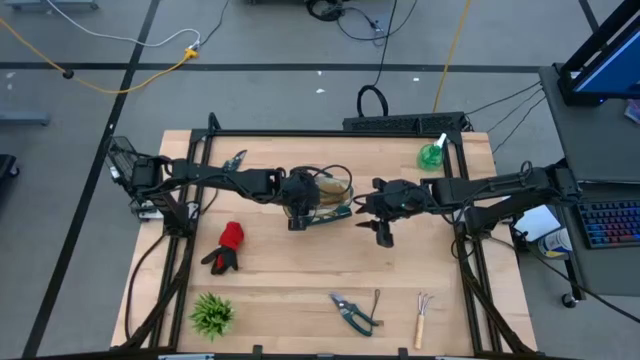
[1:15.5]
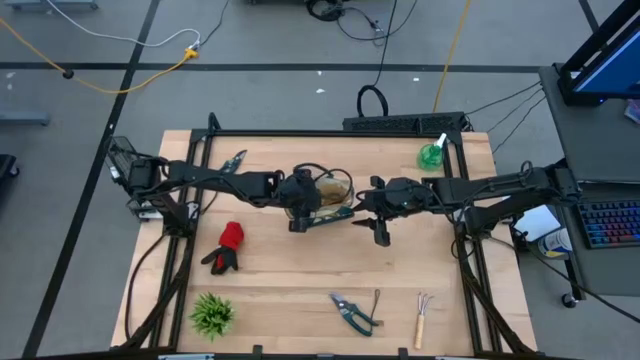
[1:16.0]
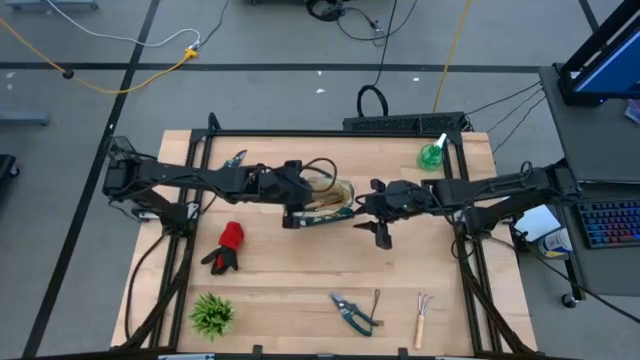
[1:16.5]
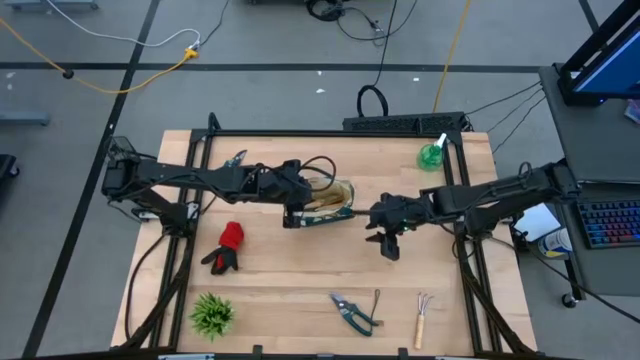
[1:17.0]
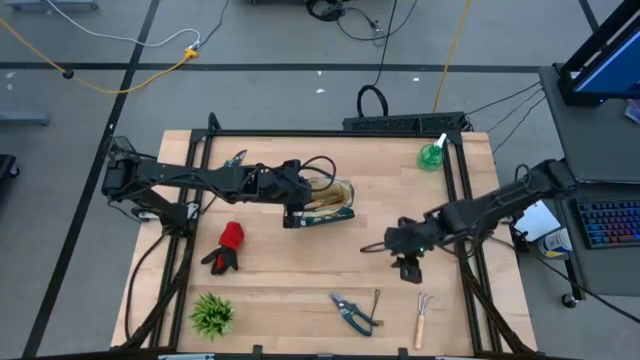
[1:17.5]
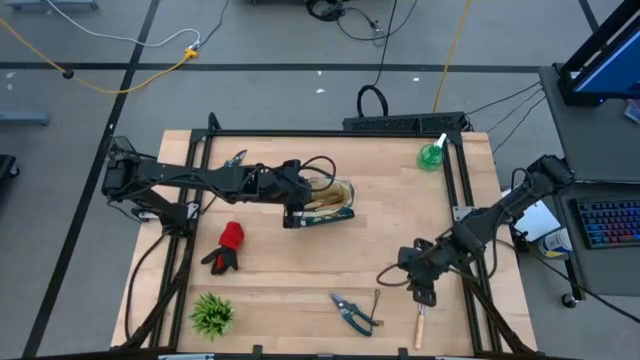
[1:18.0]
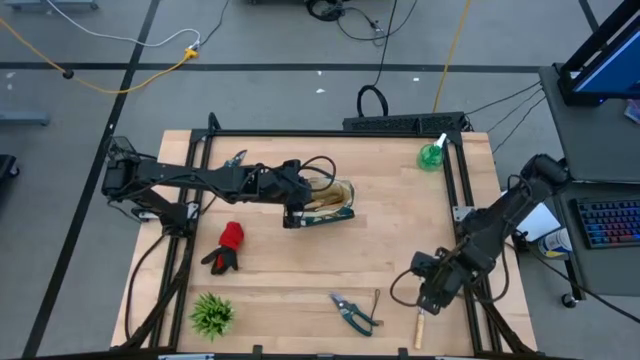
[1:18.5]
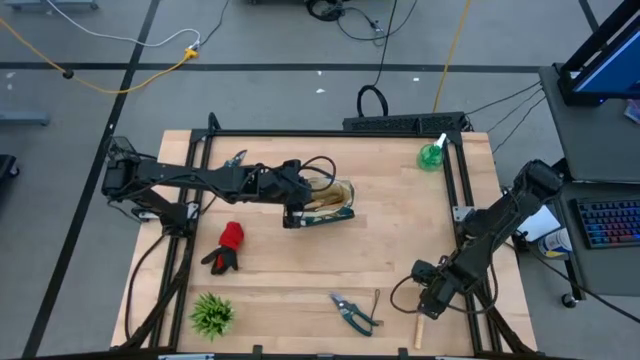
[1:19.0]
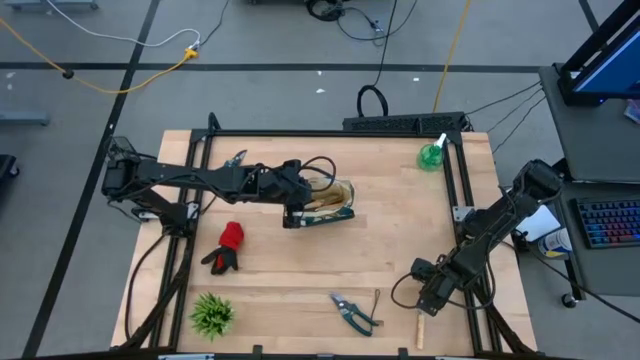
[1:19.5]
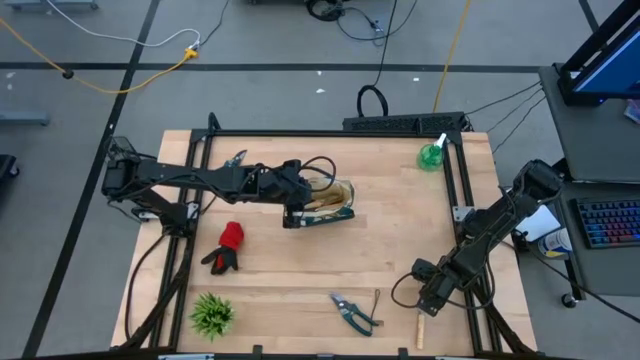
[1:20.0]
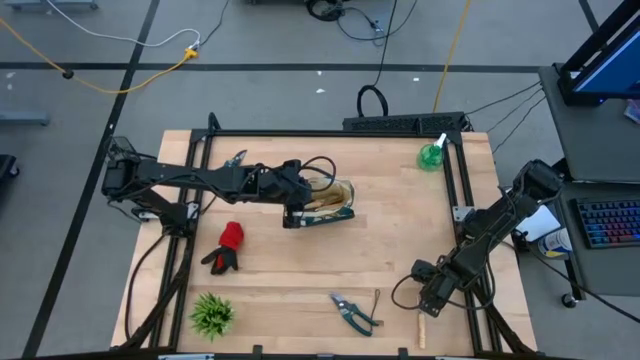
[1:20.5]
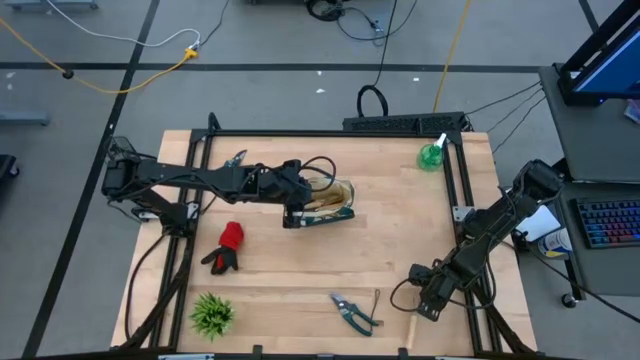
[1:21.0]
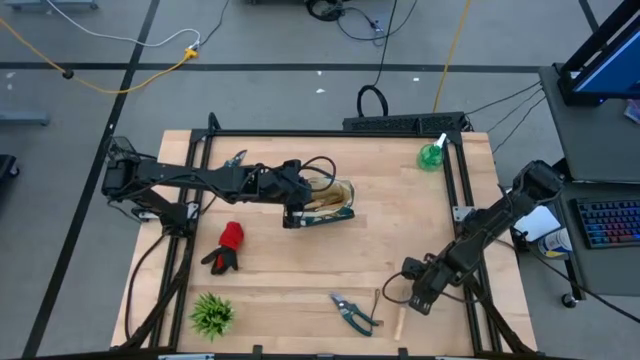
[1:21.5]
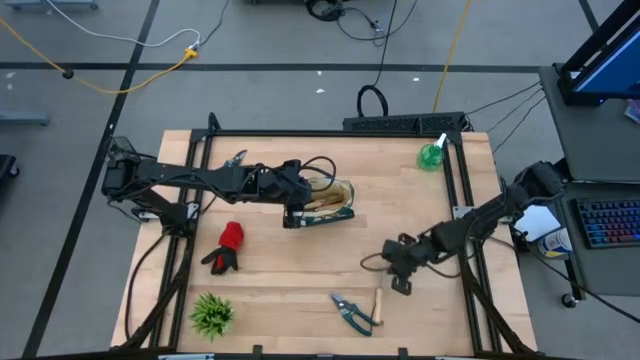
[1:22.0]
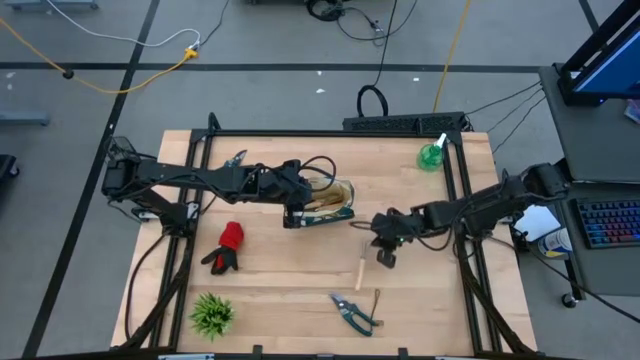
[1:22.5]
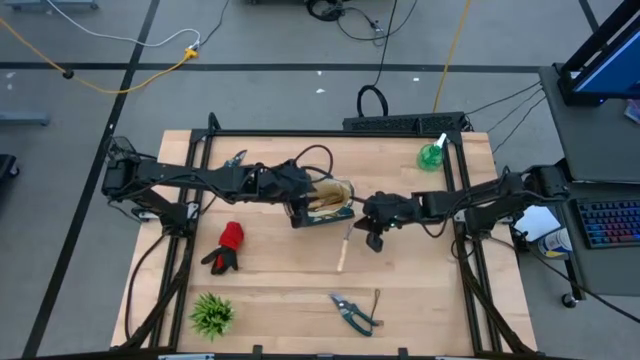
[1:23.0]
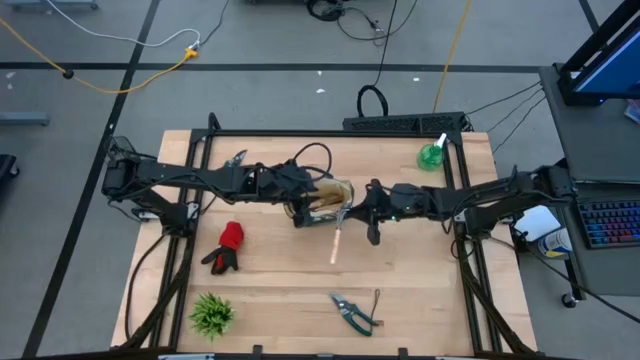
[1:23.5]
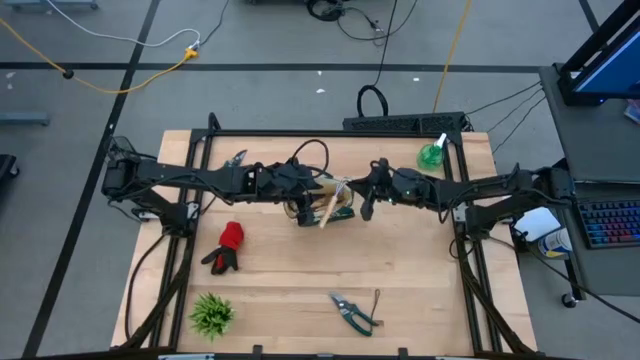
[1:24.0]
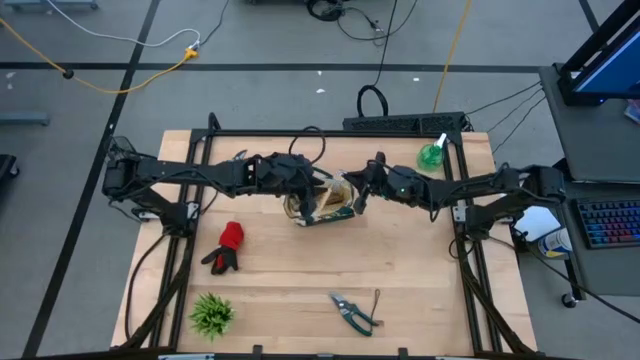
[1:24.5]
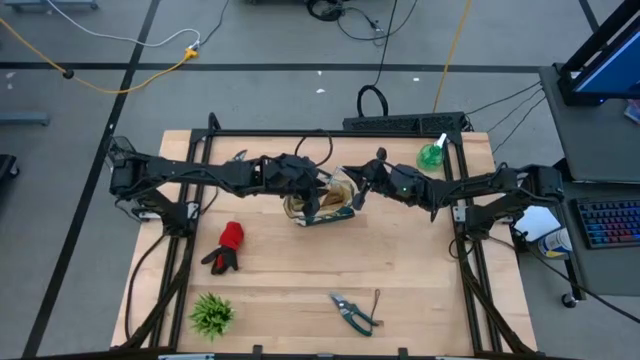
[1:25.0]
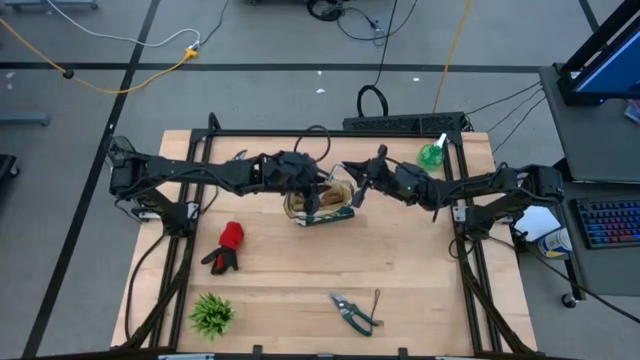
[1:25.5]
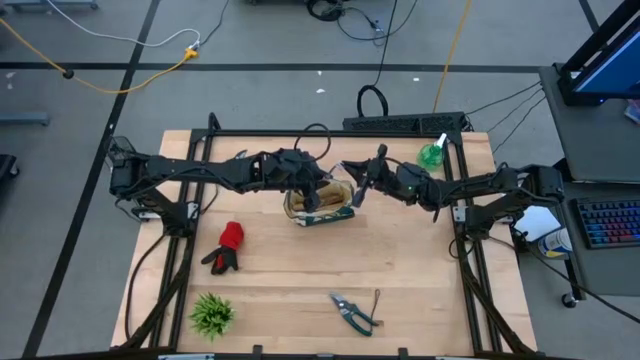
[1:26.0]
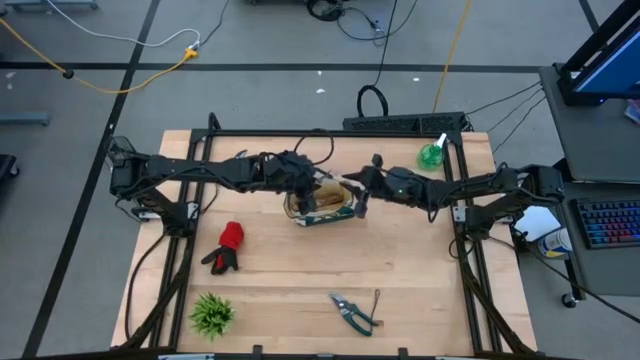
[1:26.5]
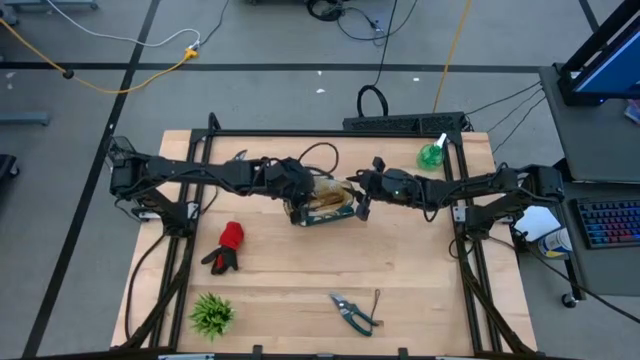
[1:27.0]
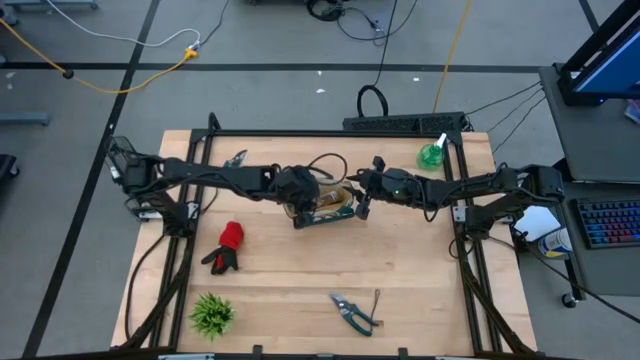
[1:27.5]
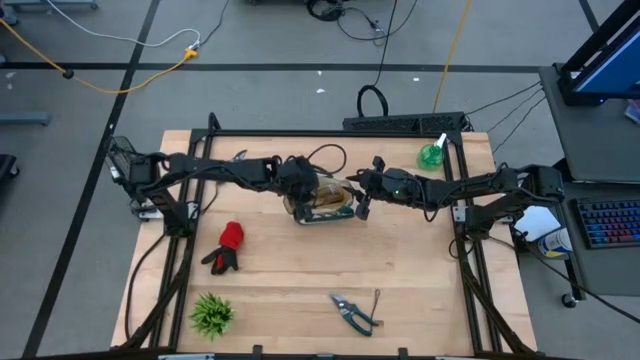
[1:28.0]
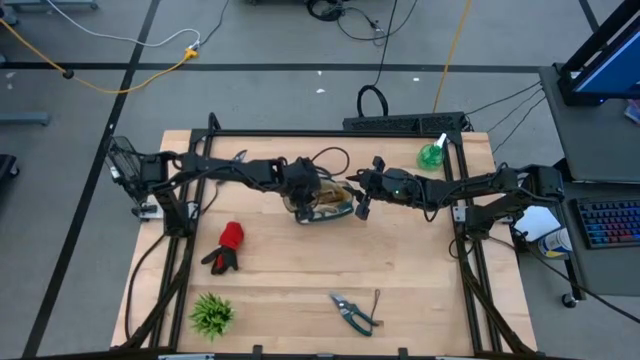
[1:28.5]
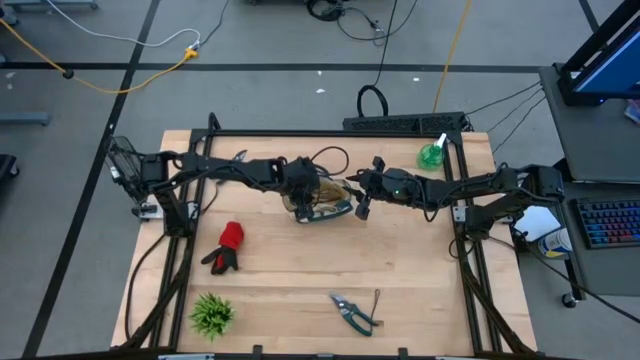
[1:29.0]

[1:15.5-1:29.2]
Task: Pick & Place Garden tools in Gardening bag
Put the brown hand rake into the gardening bag

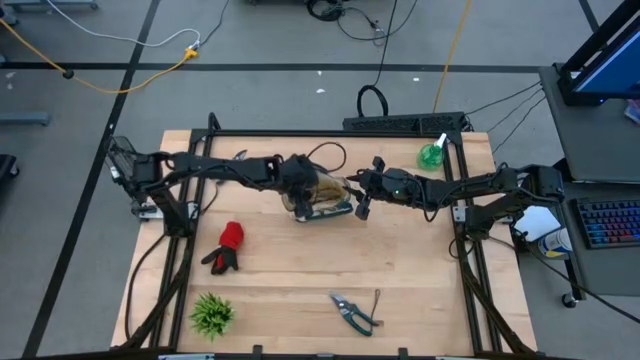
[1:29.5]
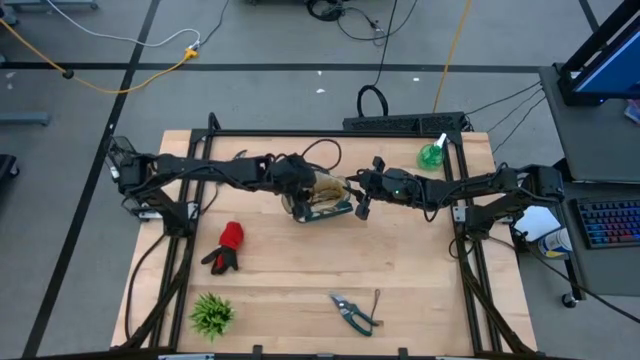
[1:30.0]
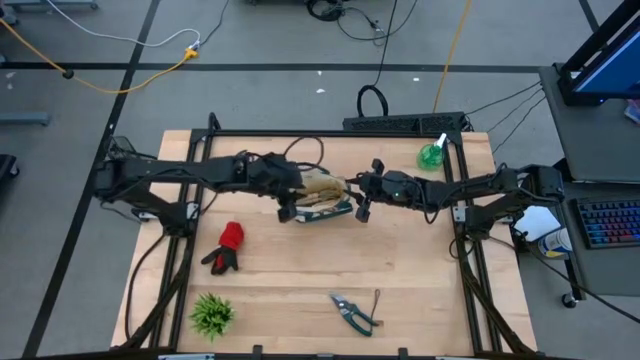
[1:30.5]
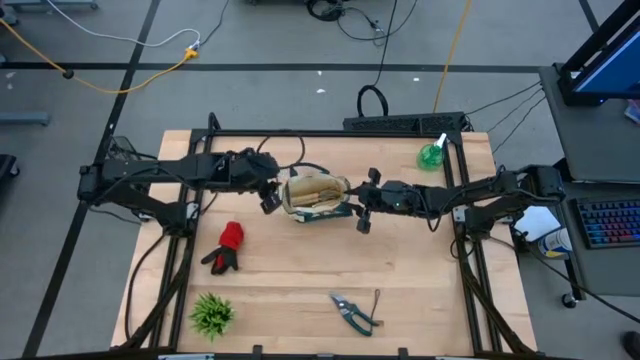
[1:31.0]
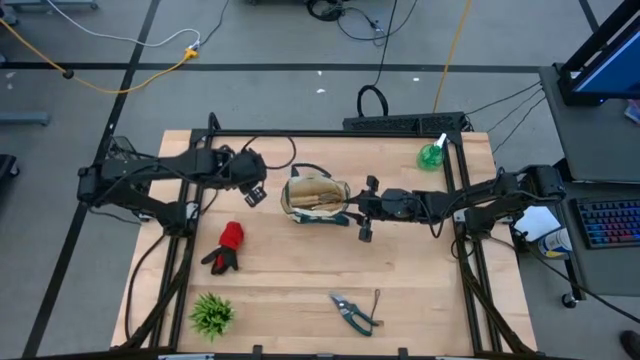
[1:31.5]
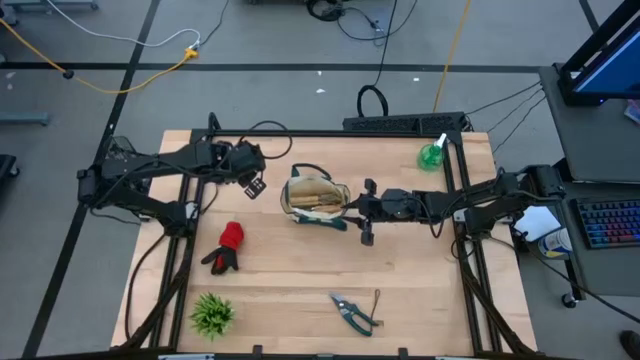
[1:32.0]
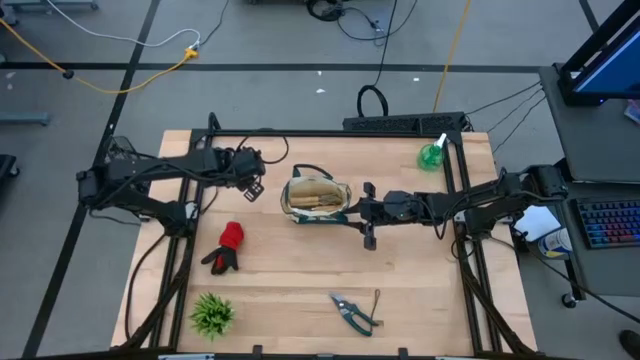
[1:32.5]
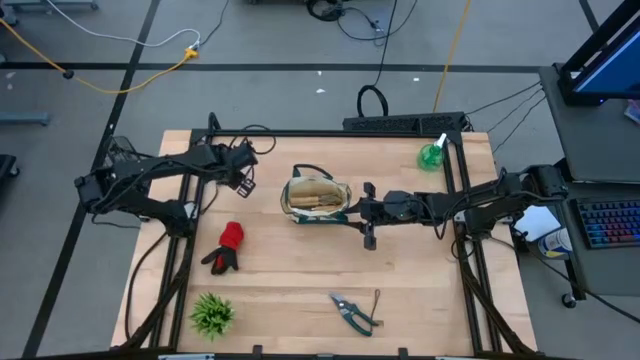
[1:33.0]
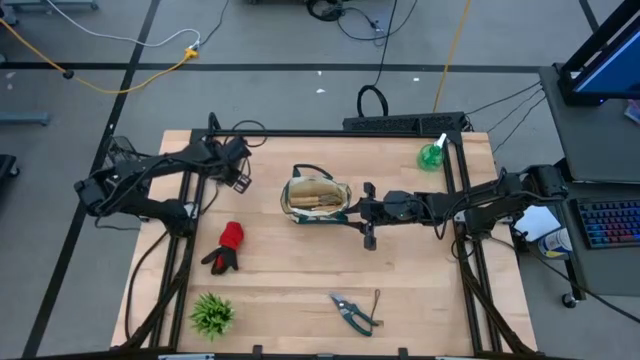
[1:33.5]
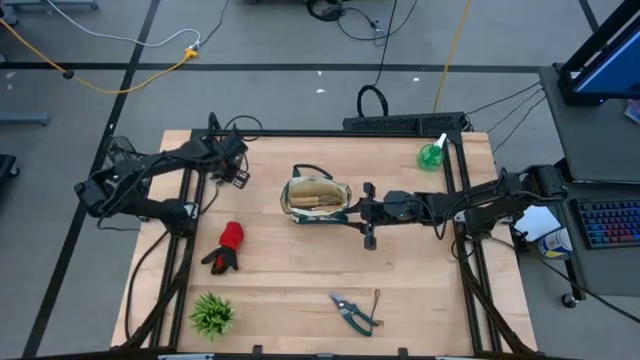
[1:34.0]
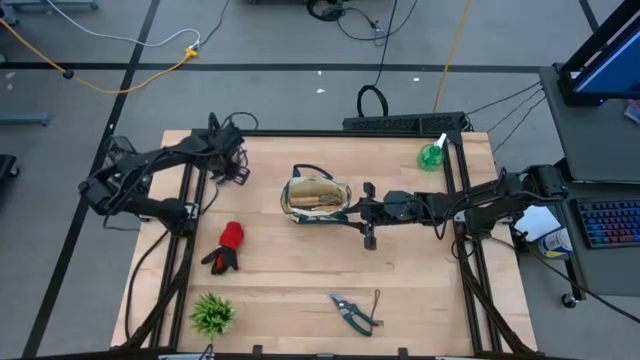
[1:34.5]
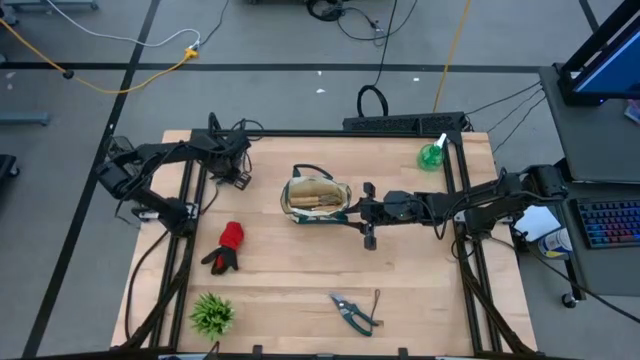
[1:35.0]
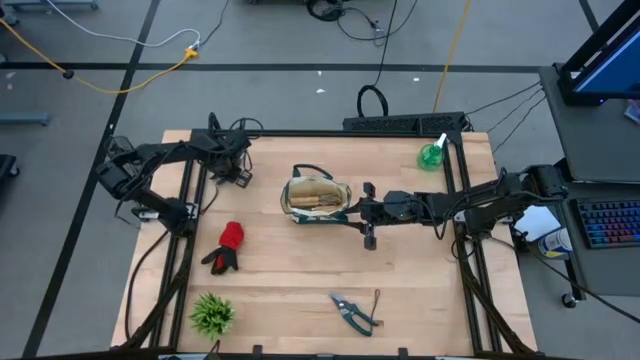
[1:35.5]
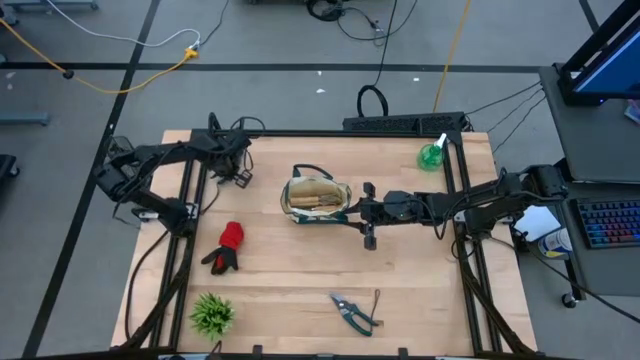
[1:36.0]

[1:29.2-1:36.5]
Put the top green shear scissors into the gardening bag

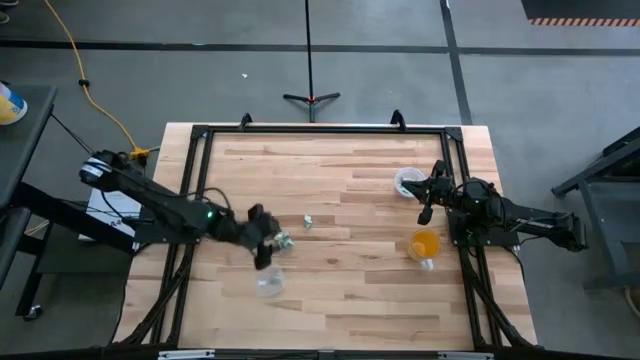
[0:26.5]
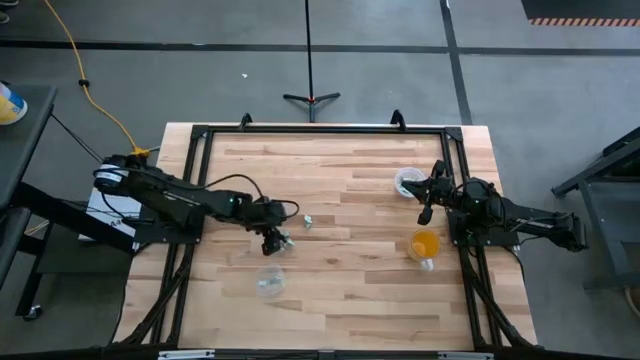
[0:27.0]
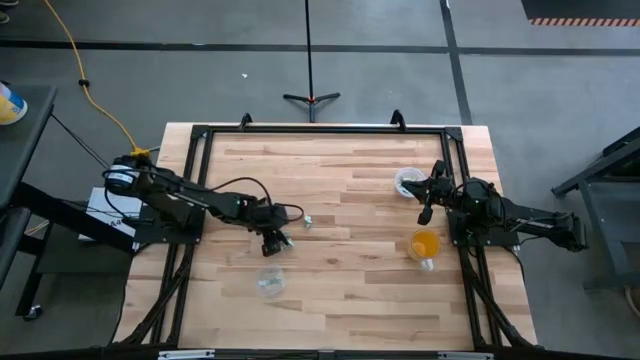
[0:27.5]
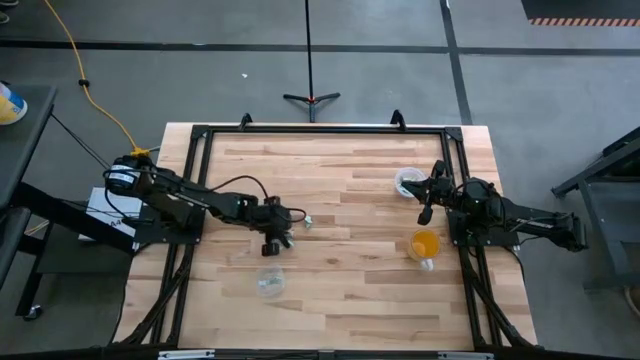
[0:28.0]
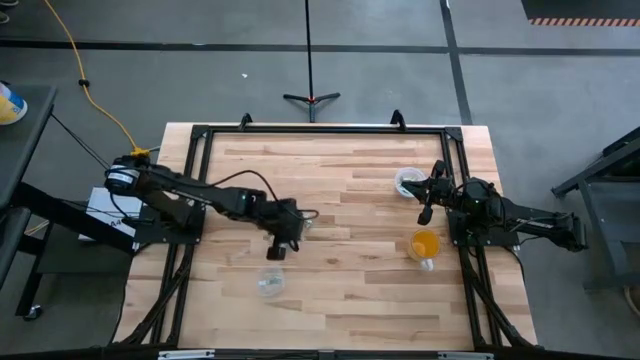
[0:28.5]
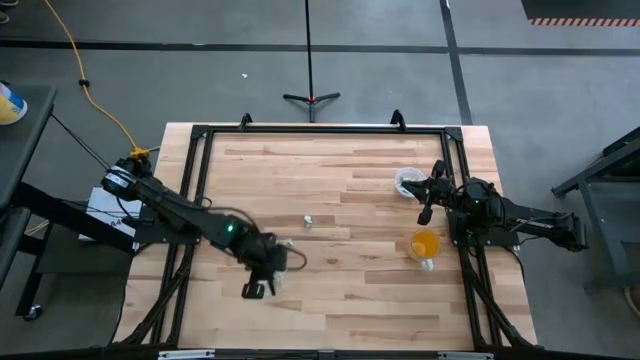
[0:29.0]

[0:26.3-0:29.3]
Task: Pick and place Stevia / Truvia into bins
Put the stevia packet into the square container
